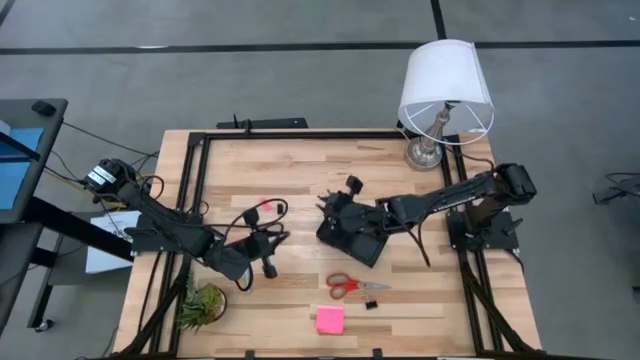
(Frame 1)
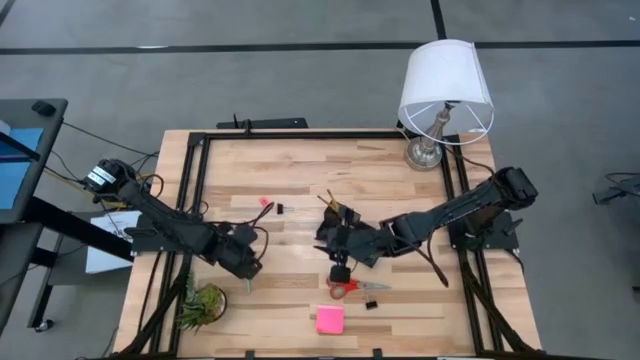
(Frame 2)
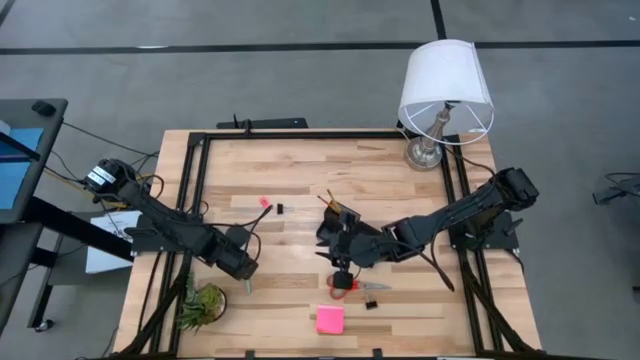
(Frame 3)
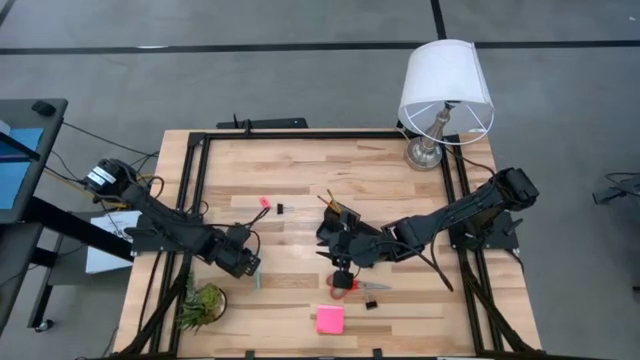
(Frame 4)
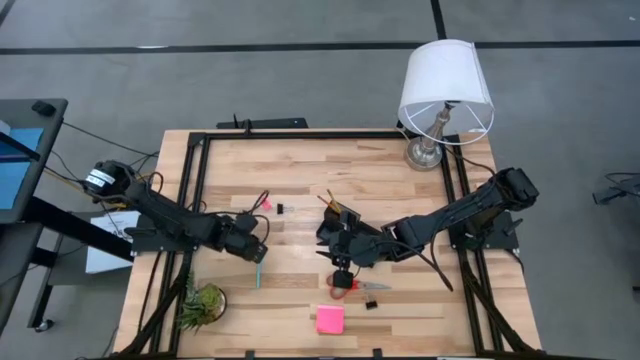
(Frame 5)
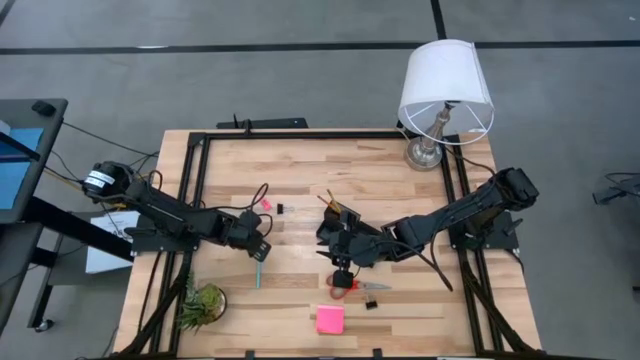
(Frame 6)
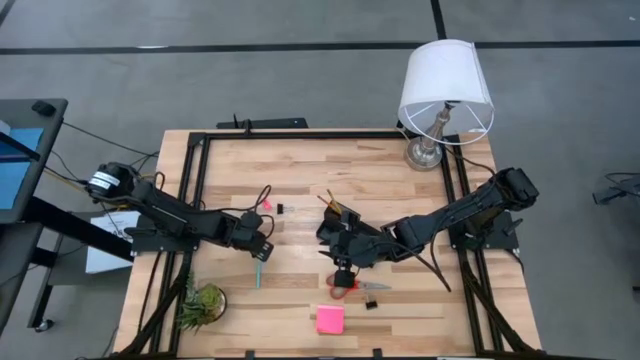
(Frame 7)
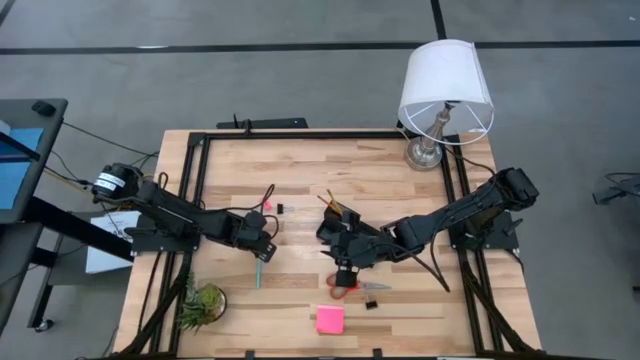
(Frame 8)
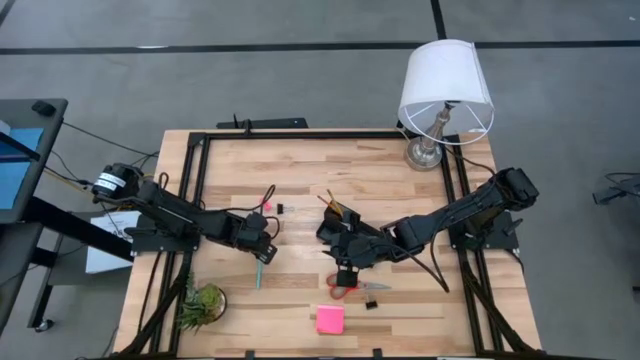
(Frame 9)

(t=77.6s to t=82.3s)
Task: Pick and place office supplies into organizer
Put the blue pen into the desk organizer

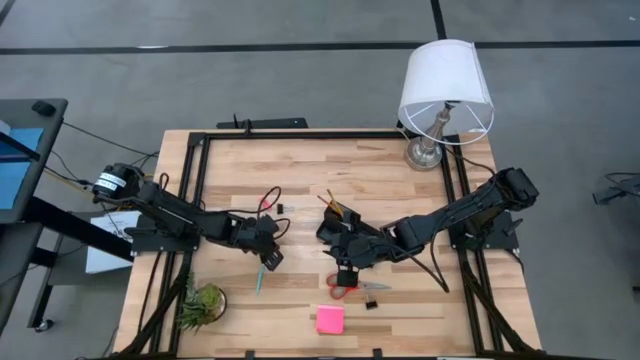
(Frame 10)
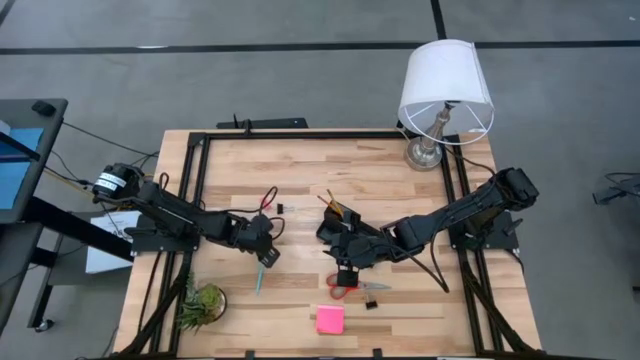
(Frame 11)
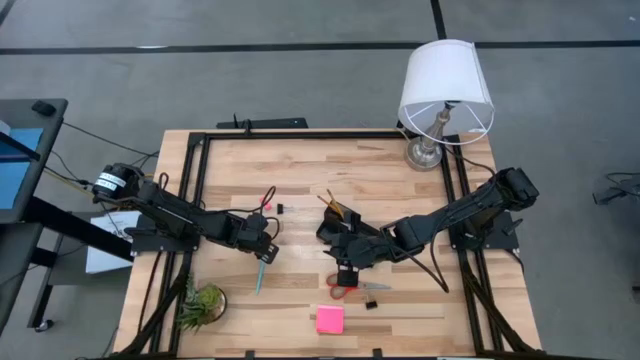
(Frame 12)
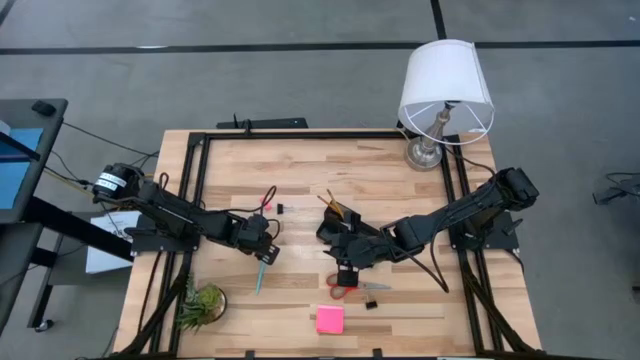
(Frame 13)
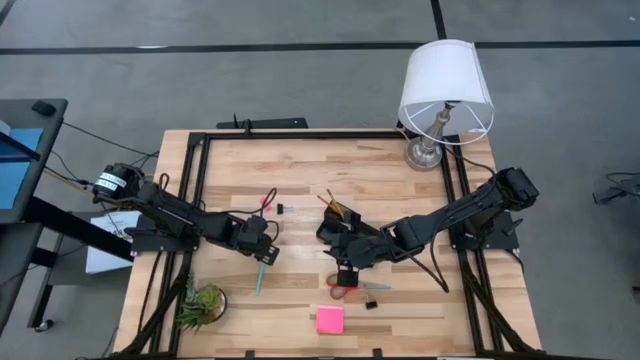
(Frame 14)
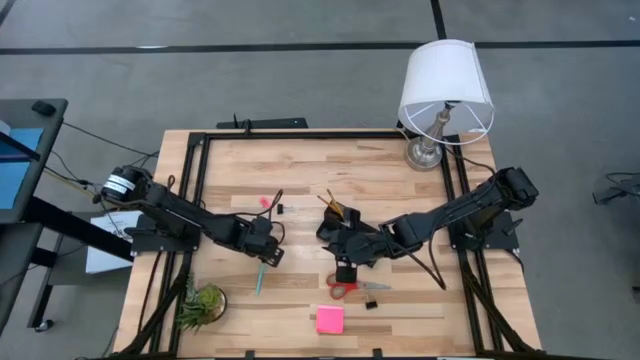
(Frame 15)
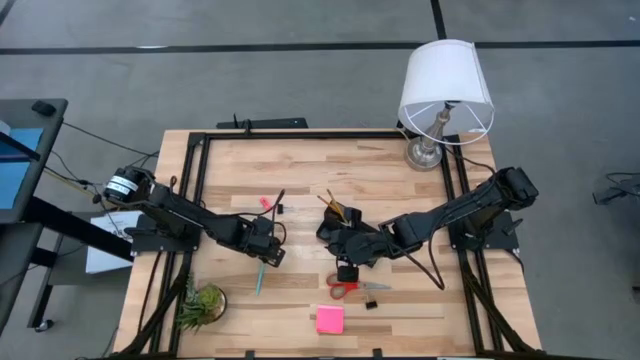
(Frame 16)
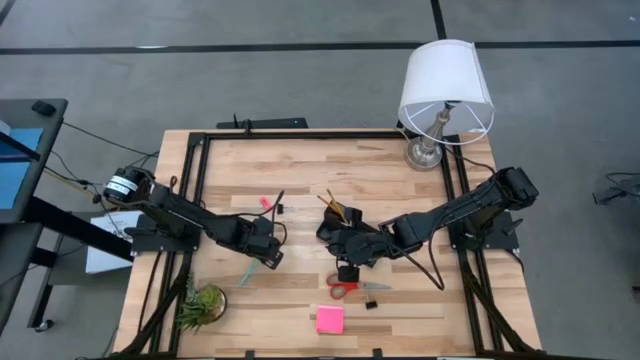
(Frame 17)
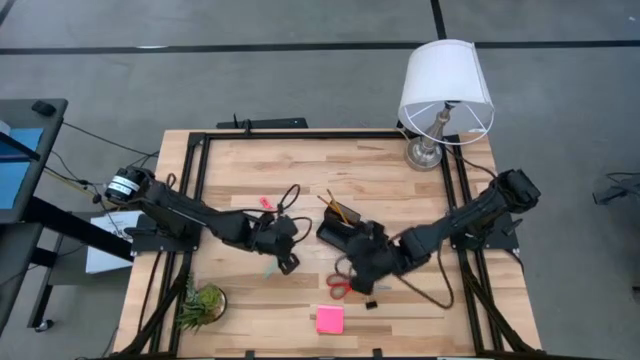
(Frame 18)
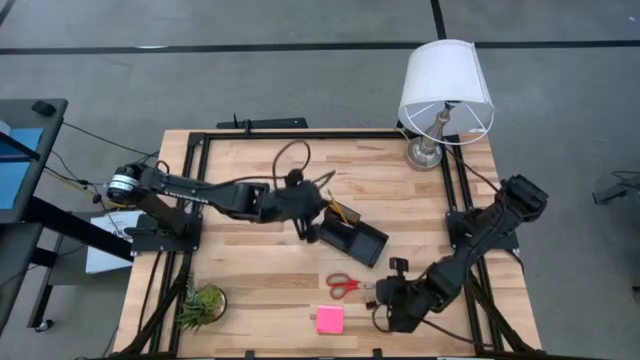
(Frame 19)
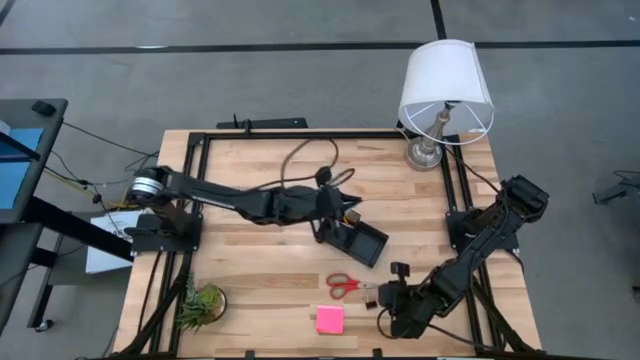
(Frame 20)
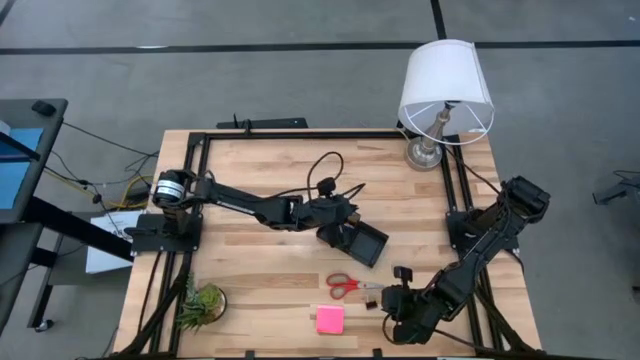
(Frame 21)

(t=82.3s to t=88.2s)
Put the blue pen into the desk organizer

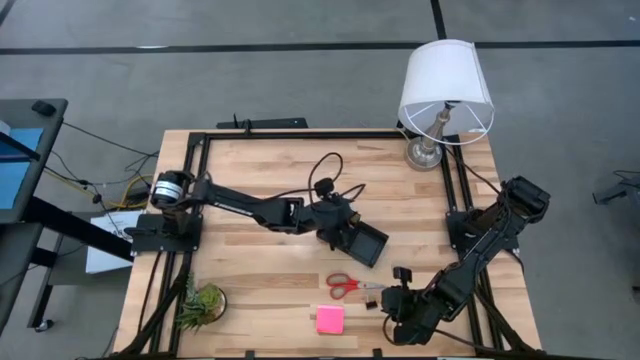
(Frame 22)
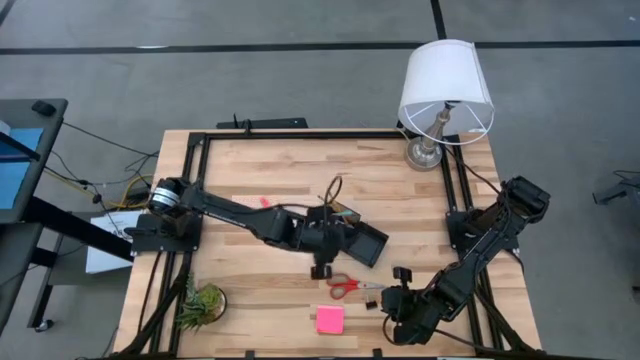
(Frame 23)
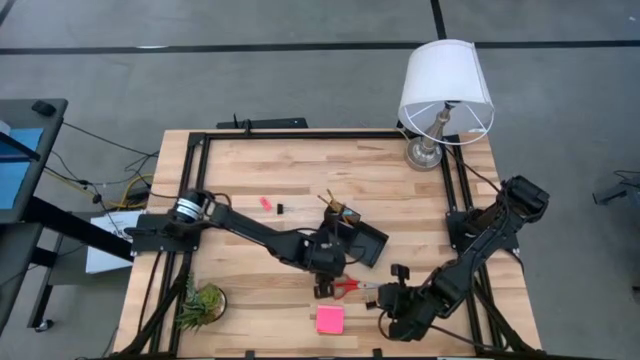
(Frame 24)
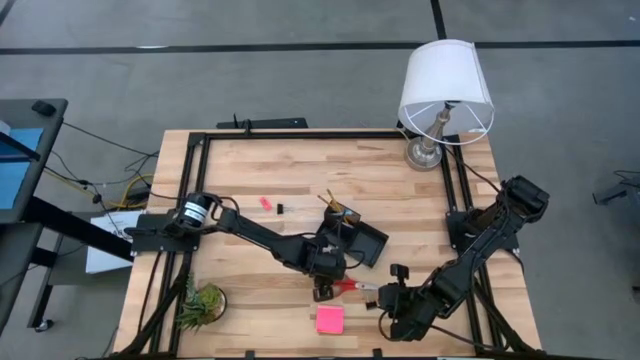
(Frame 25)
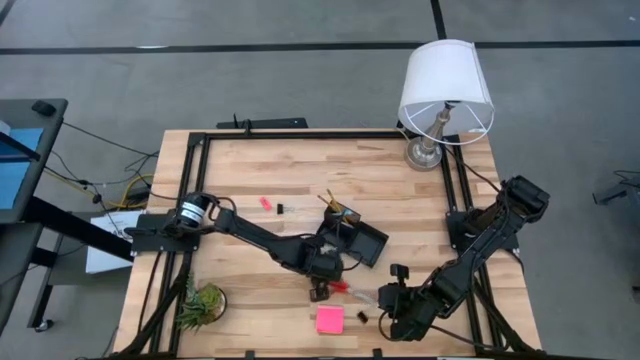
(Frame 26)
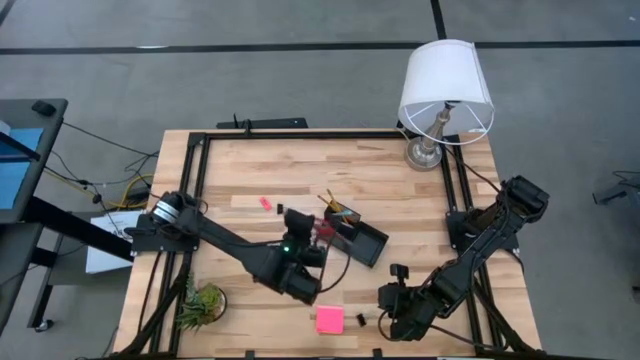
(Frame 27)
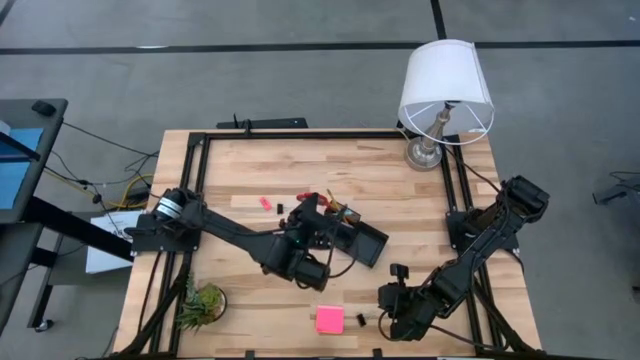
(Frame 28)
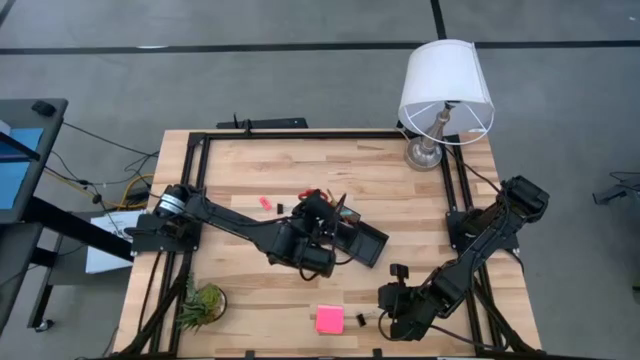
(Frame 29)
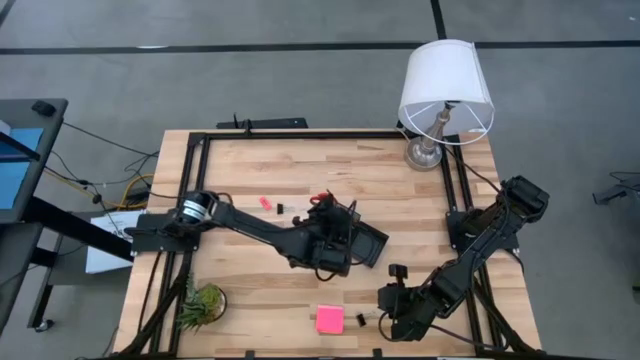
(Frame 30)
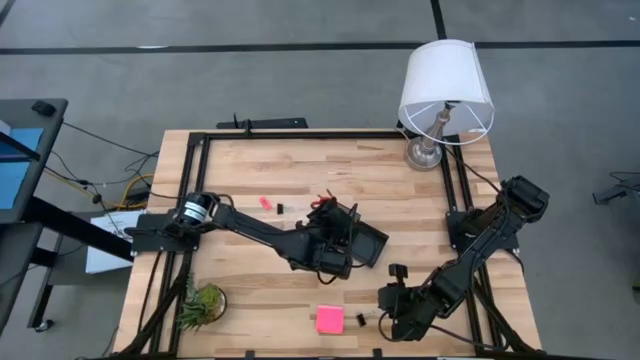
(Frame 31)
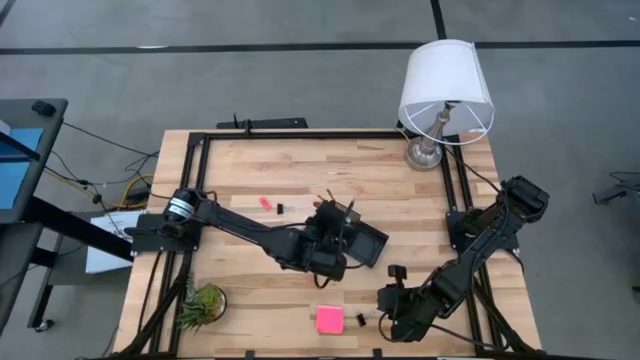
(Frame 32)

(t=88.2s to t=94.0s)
Put the red scissor into the desk organizer

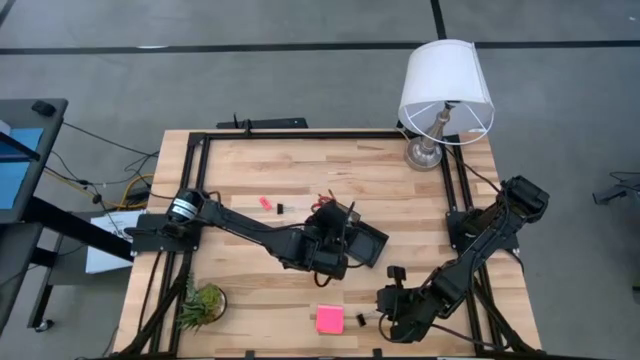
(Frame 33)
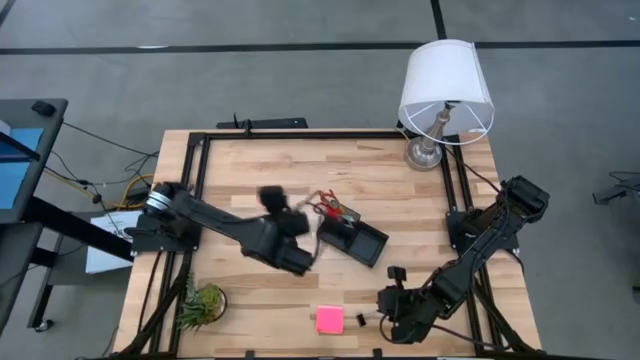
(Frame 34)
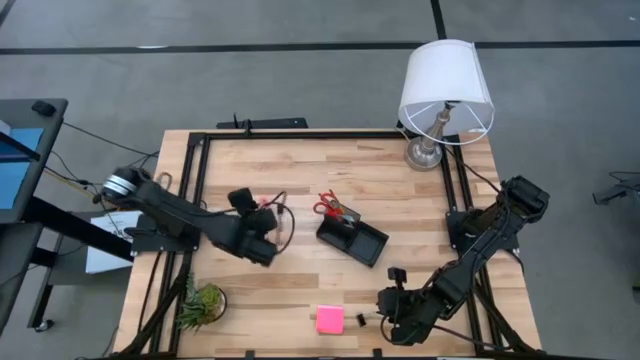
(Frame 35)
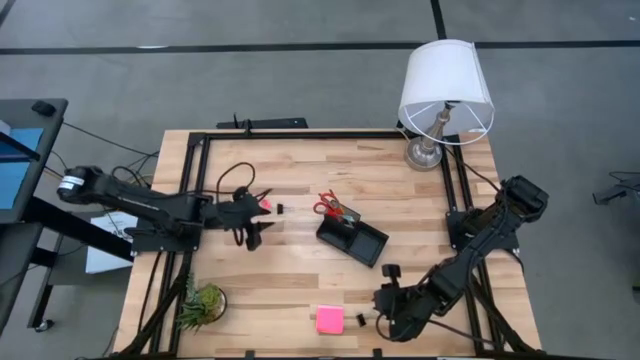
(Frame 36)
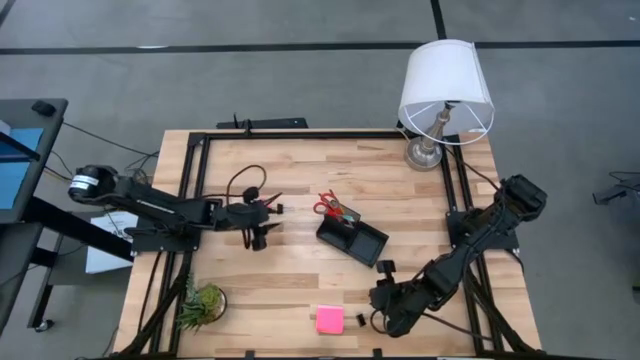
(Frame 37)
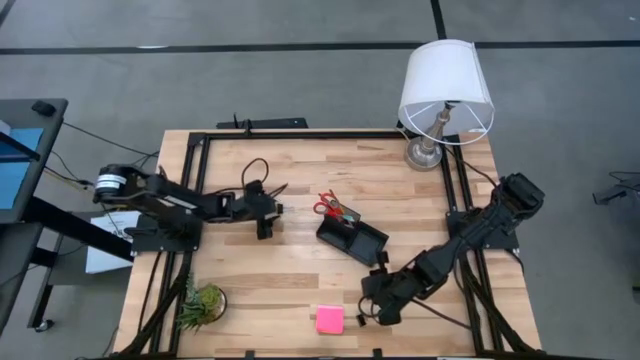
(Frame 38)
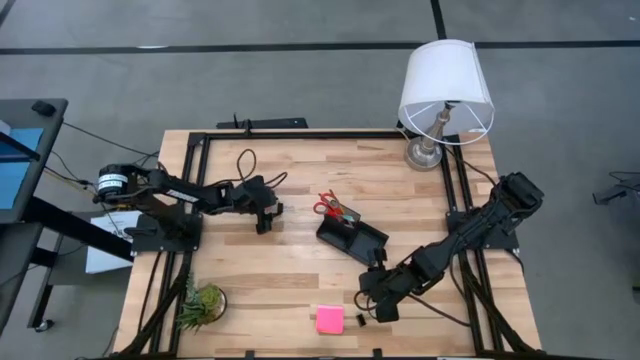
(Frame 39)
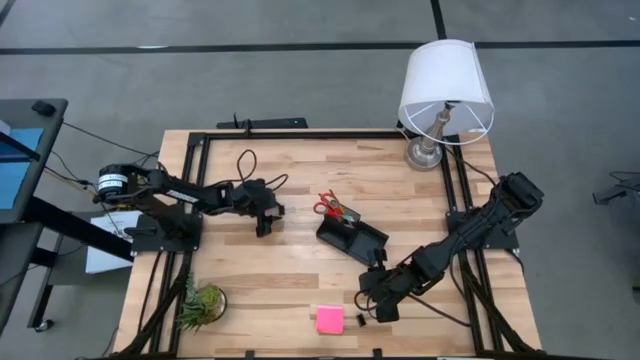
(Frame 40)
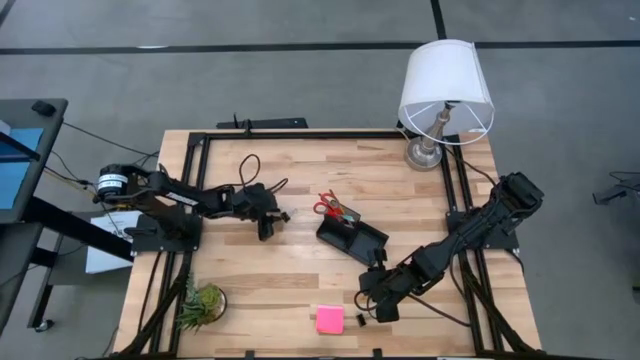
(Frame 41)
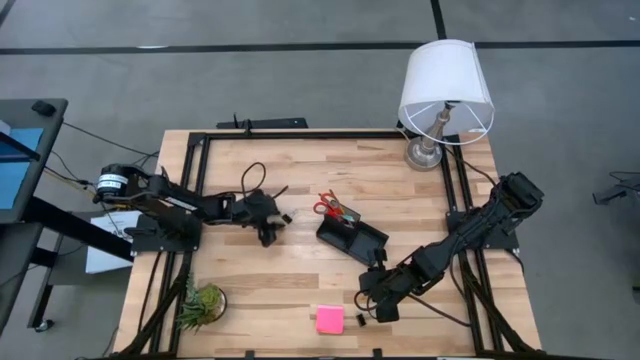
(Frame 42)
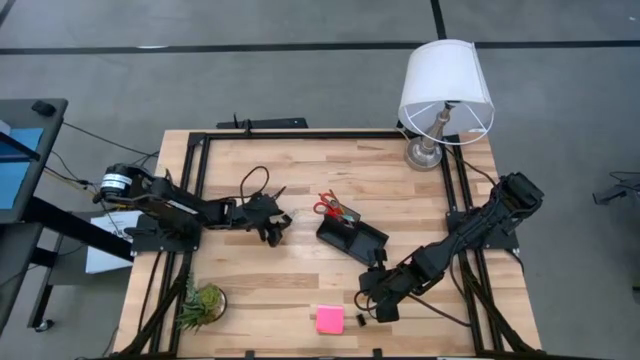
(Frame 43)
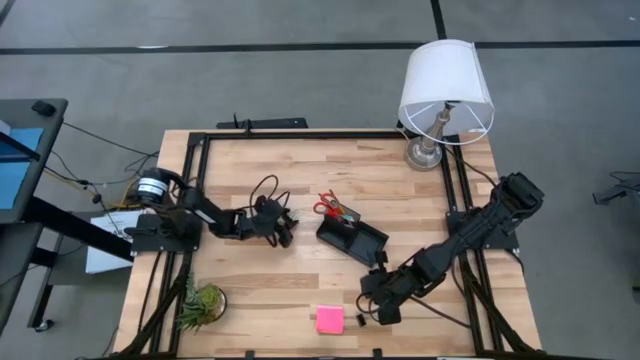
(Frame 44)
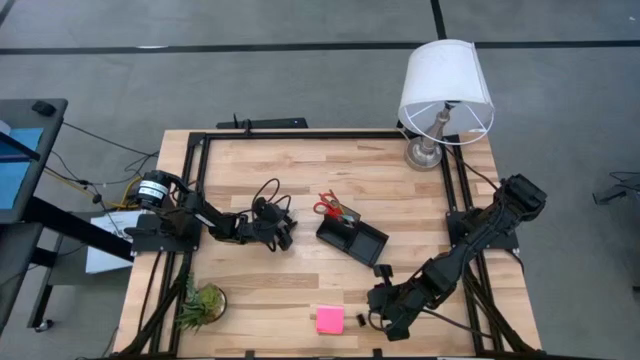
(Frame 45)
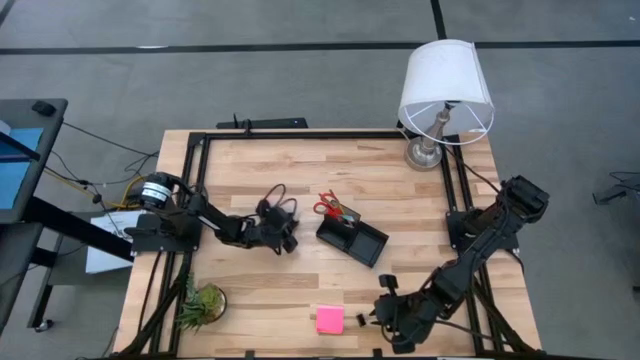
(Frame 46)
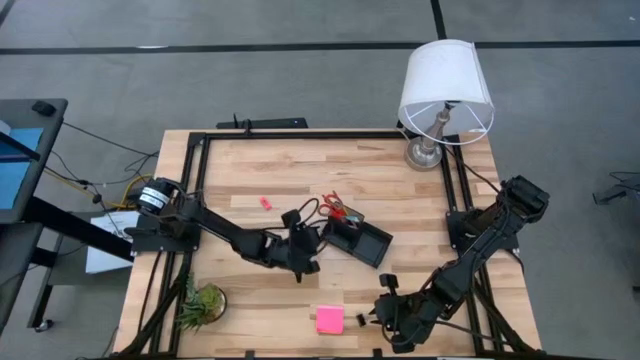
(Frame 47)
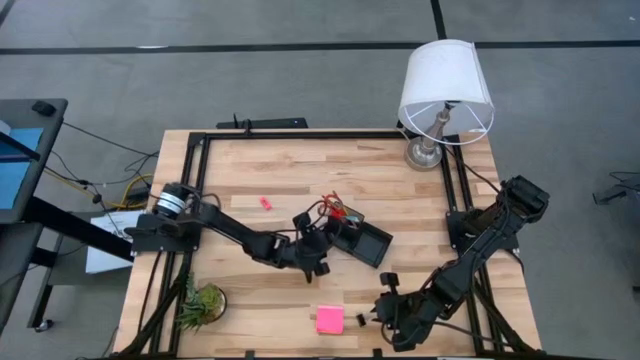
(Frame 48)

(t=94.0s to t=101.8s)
Put the top binder clip into the desk organizer
